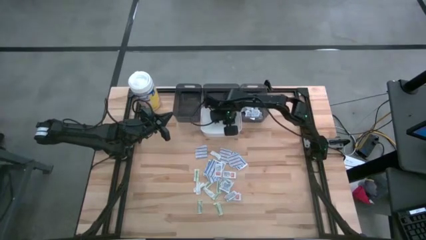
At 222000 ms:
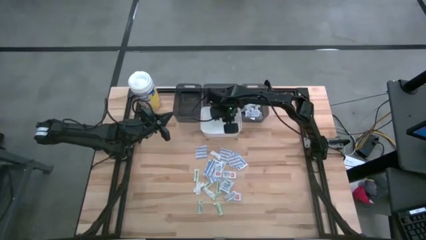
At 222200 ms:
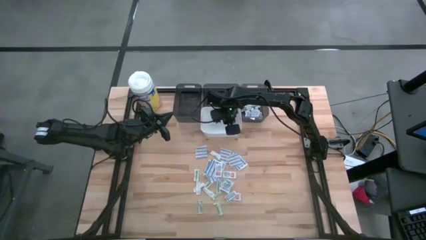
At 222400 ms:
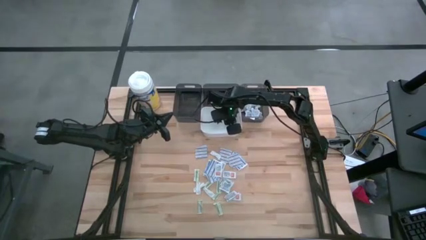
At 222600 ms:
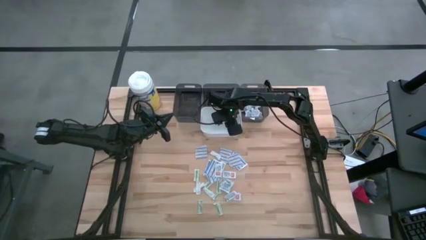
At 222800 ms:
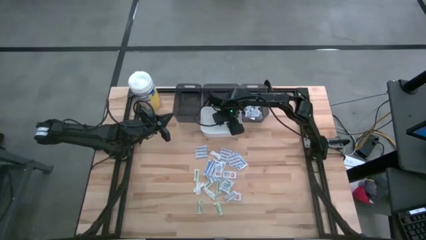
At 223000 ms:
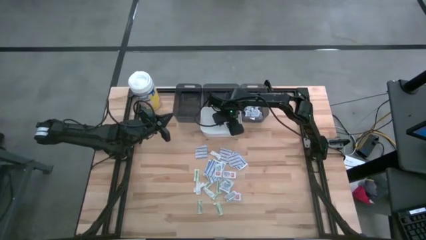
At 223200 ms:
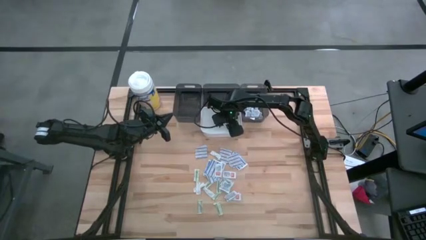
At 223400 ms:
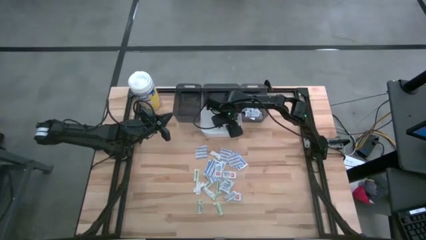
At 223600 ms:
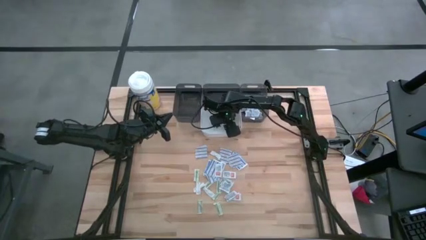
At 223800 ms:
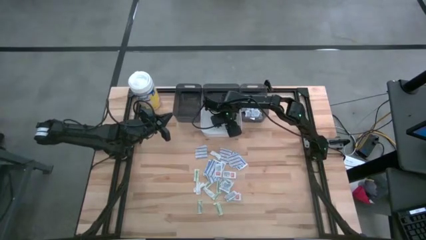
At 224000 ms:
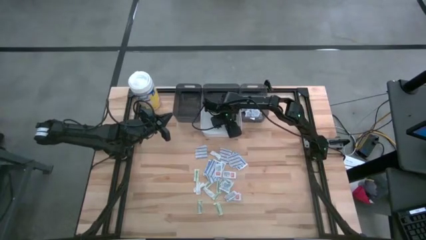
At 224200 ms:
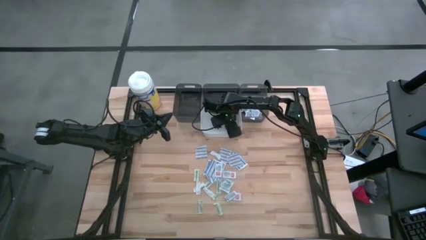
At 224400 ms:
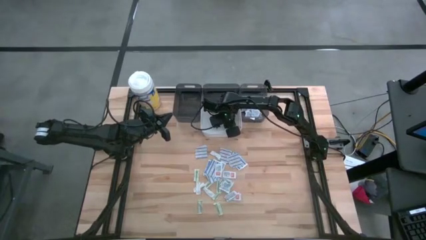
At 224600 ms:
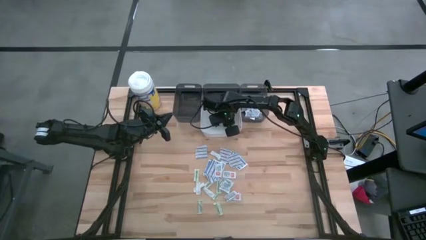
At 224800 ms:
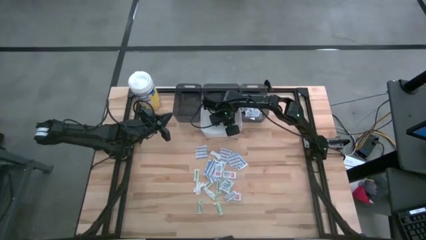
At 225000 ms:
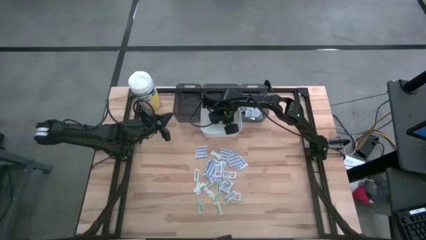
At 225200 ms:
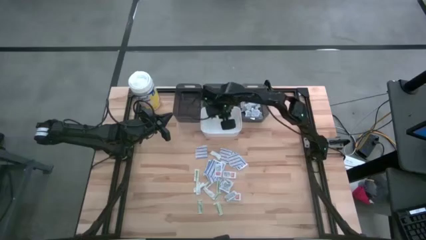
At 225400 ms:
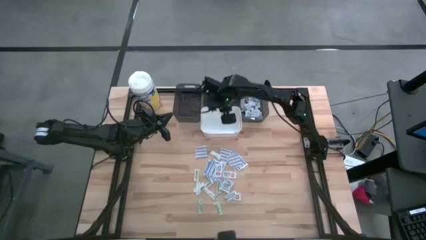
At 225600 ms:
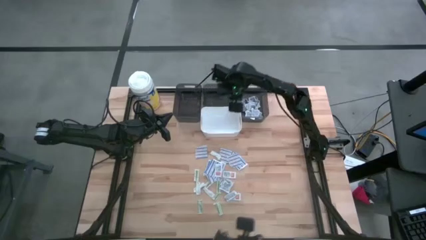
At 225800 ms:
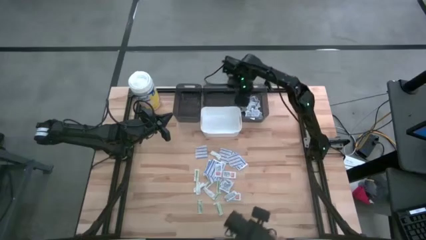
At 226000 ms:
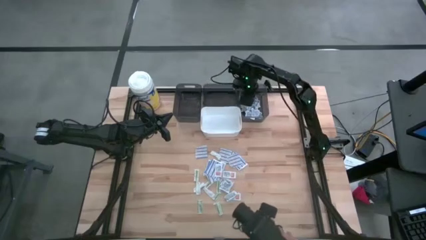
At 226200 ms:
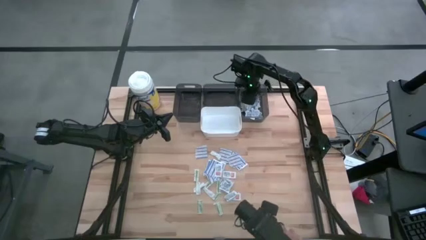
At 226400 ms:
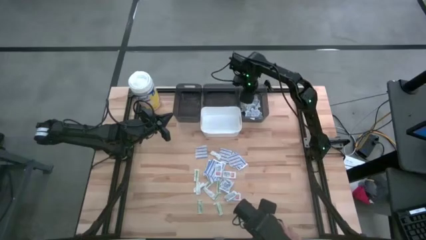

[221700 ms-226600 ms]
Task: Pick & Place First Aid Supplies
Put the blue alcohol pad into the right black bin

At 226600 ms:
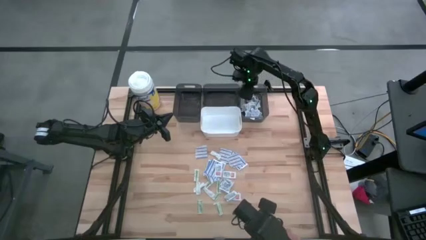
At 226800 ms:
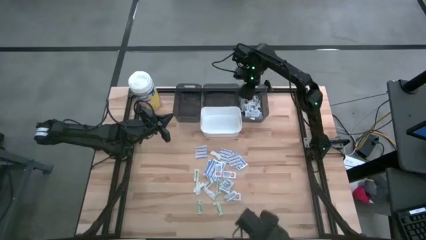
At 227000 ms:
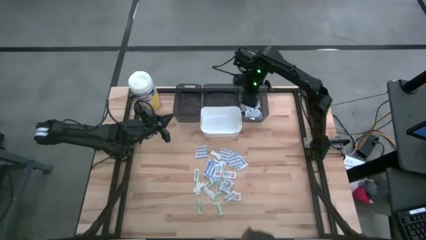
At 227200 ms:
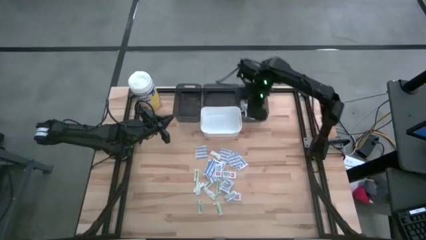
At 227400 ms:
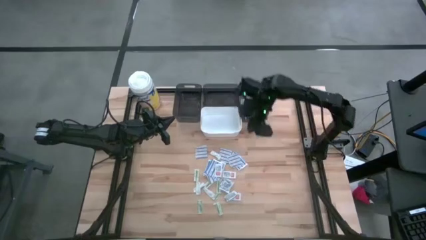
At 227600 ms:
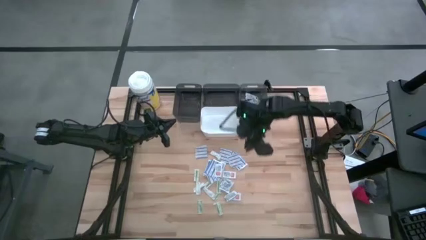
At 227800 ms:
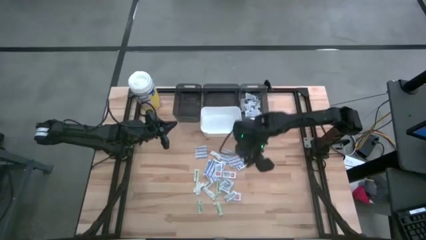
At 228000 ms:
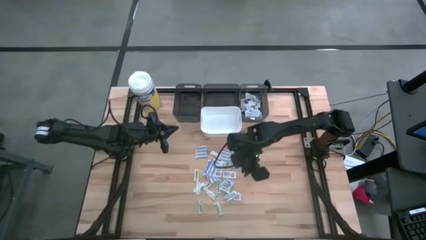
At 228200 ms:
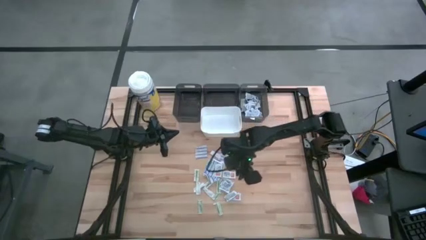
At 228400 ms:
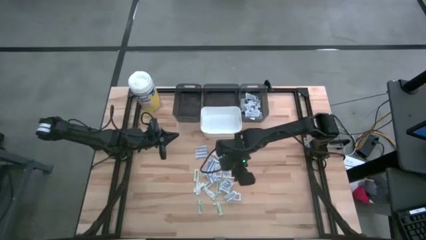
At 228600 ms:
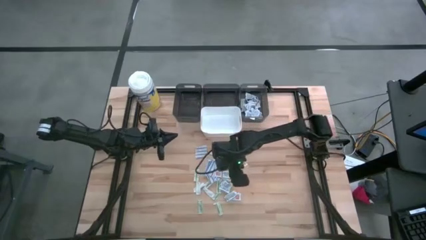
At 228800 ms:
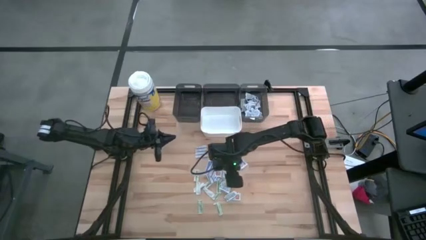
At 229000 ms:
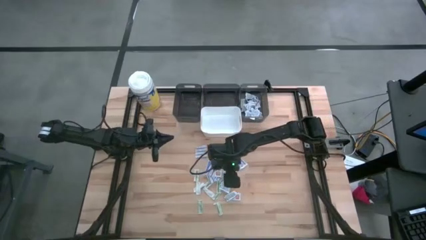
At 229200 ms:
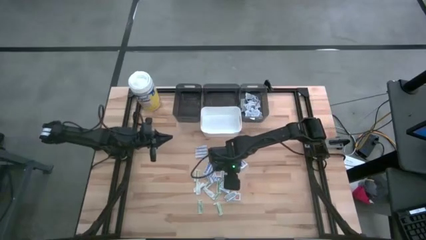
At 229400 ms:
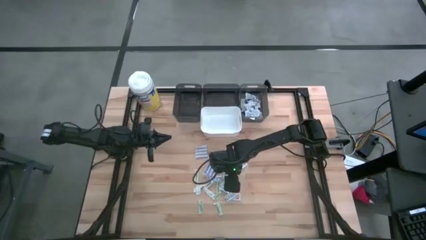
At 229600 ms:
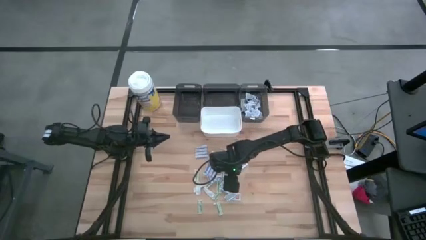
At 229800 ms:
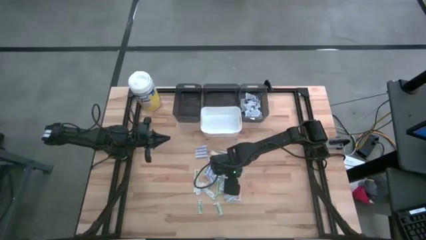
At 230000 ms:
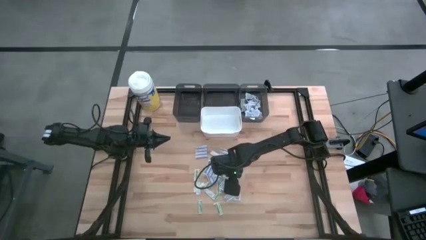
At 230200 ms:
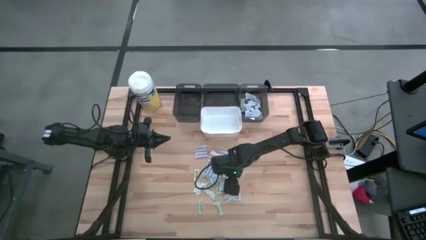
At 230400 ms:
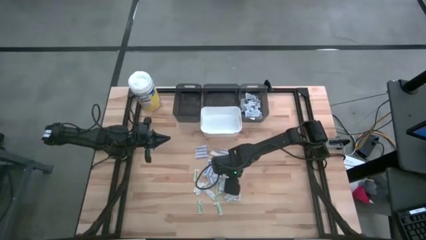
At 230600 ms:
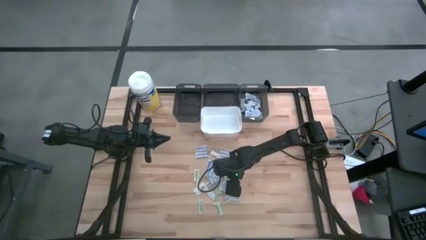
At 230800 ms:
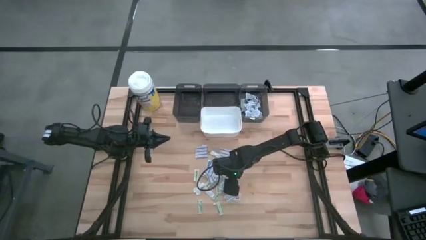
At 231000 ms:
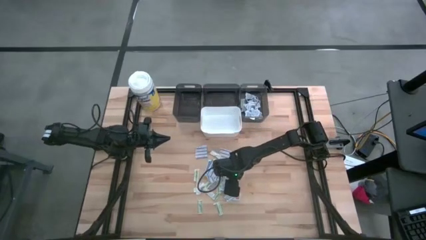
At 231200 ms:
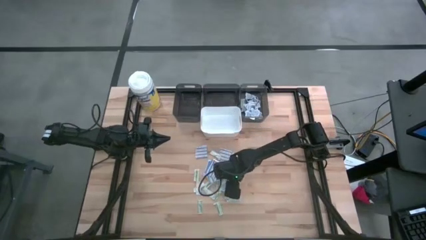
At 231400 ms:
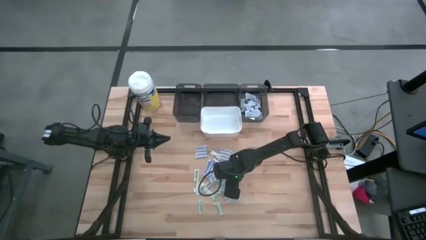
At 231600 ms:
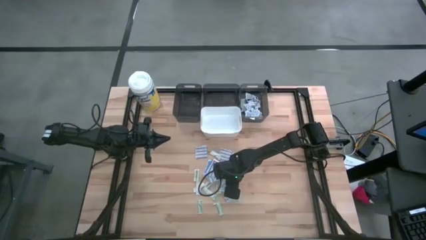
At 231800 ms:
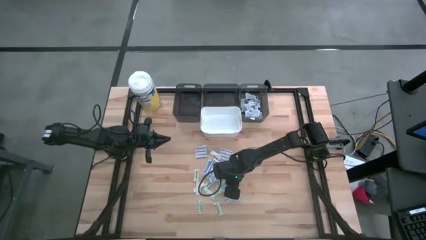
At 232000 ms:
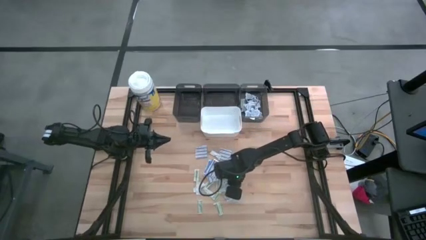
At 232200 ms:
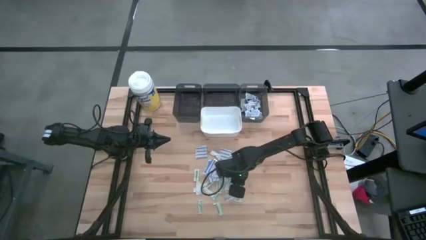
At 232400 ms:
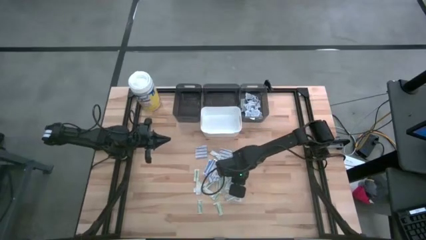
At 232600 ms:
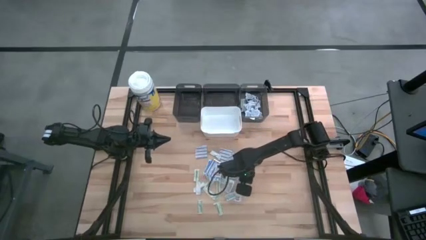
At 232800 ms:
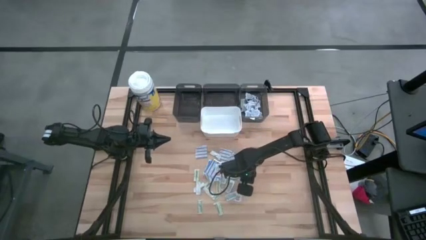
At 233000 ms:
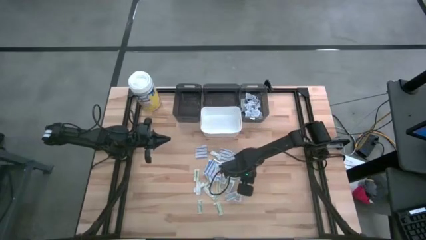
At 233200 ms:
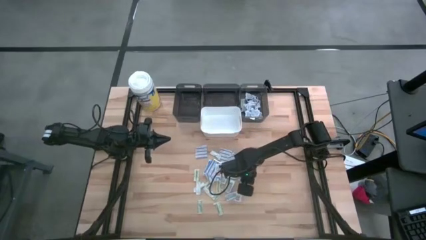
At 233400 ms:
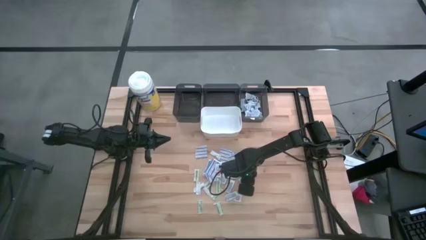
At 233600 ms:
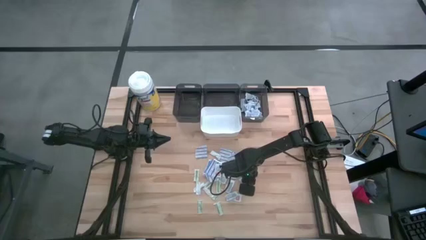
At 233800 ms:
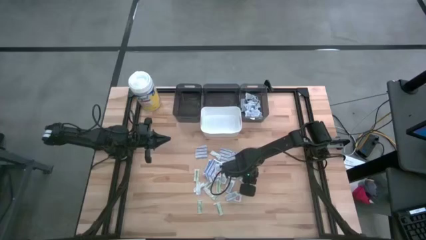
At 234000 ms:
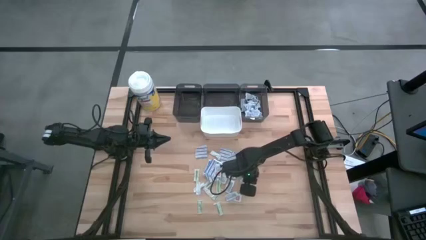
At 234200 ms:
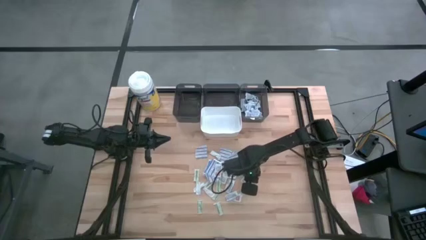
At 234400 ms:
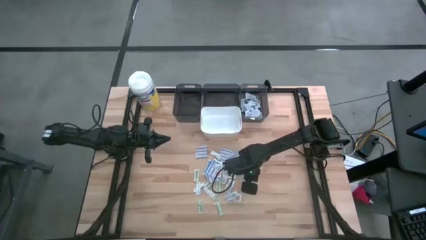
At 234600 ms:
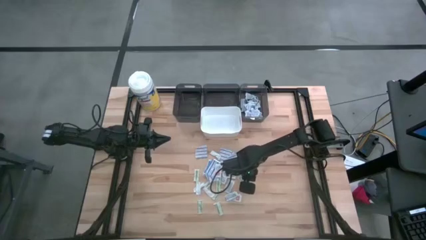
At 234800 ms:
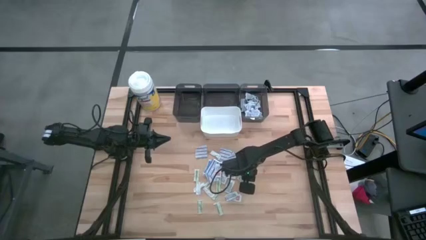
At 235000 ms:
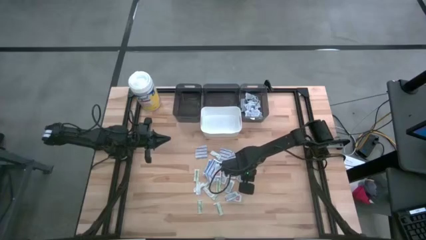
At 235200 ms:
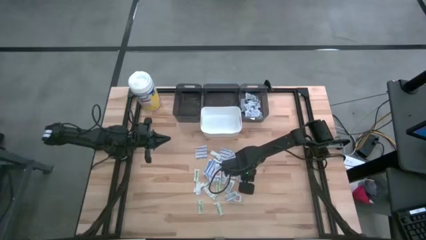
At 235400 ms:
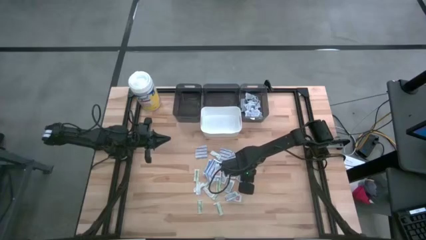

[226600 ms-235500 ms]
Put the blue alcohol pad into the right black bin

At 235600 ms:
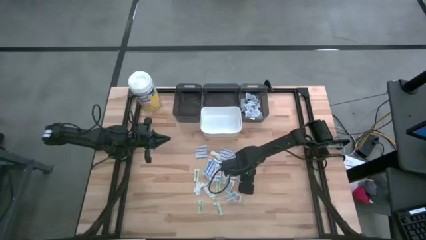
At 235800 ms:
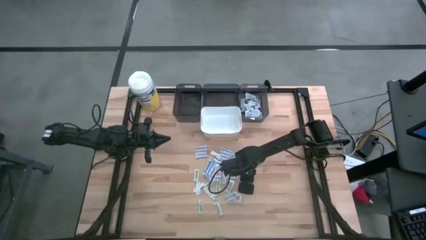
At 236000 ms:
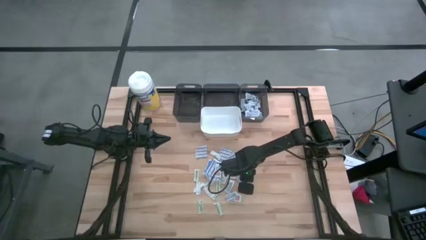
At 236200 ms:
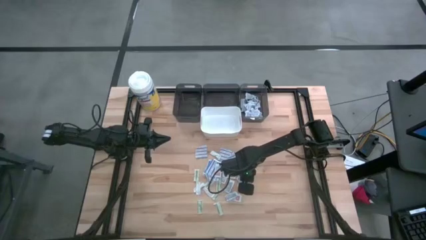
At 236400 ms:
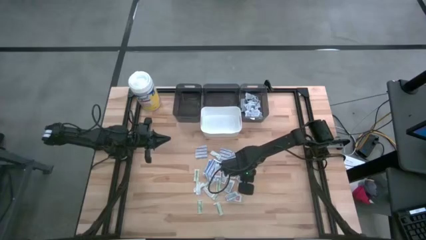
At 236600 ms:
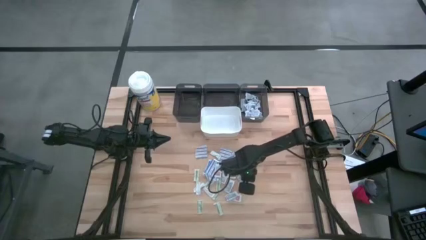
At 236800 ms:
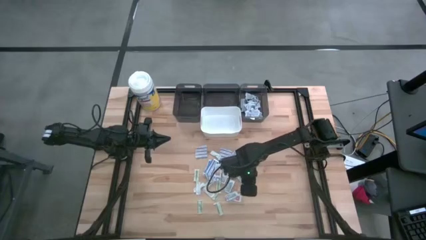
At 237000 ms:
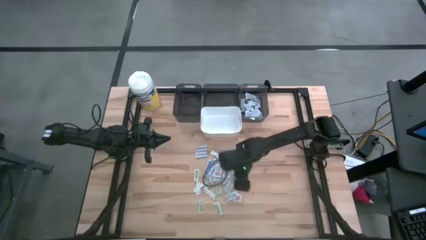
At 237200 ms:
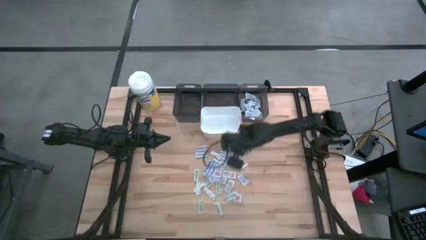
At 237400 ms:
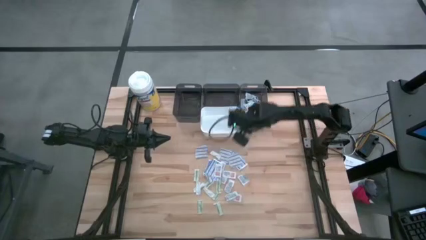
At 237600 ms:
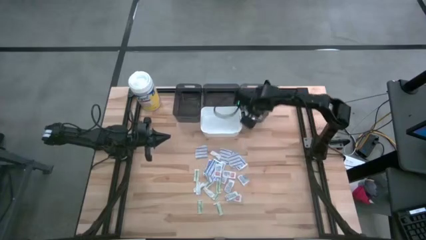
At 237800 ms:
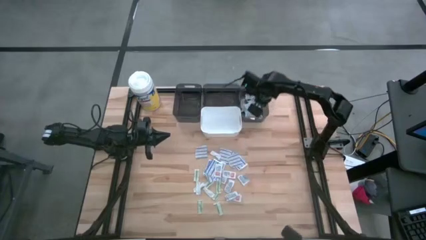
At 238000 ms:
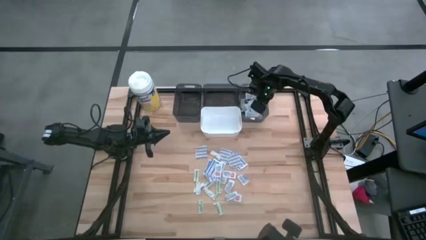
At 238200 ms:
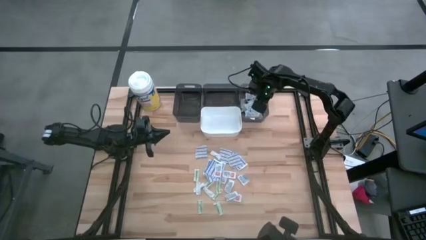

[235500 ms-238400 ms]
Put the blue alcohol pad into the right black bin
